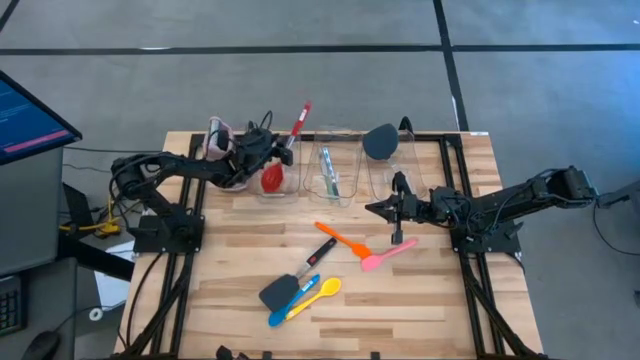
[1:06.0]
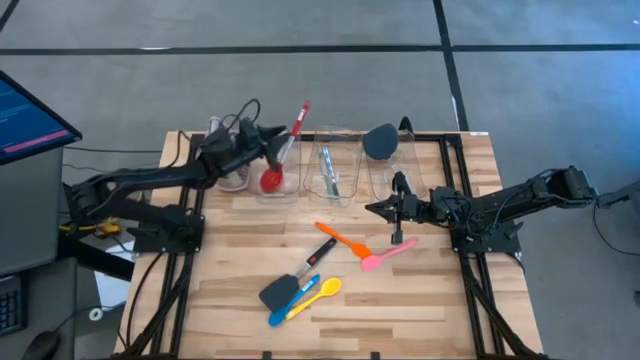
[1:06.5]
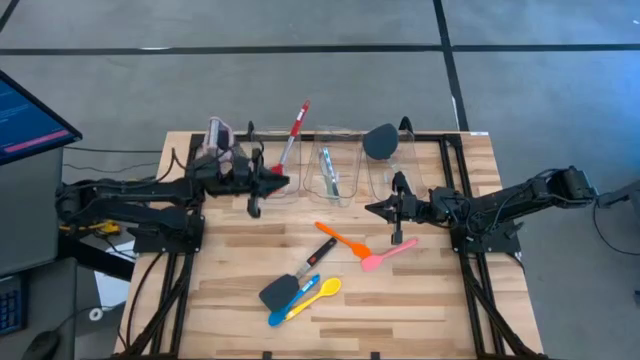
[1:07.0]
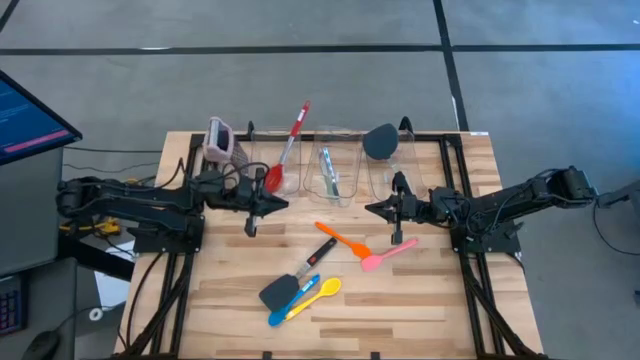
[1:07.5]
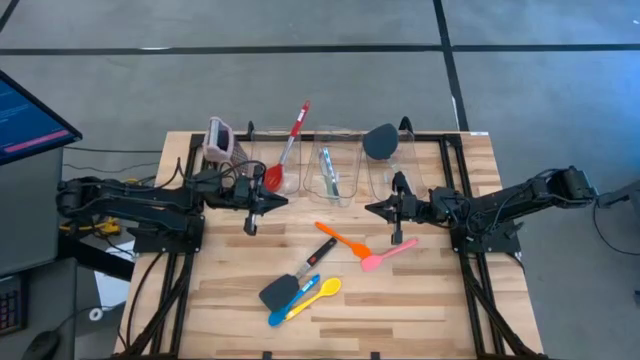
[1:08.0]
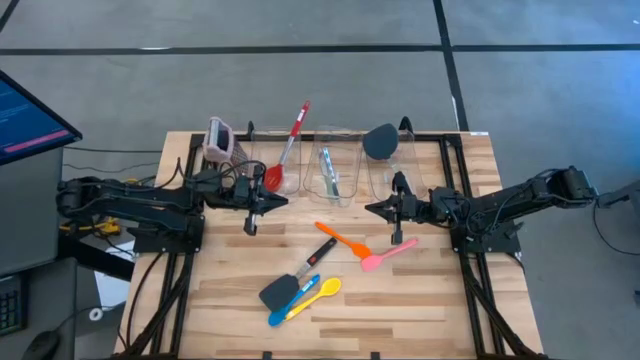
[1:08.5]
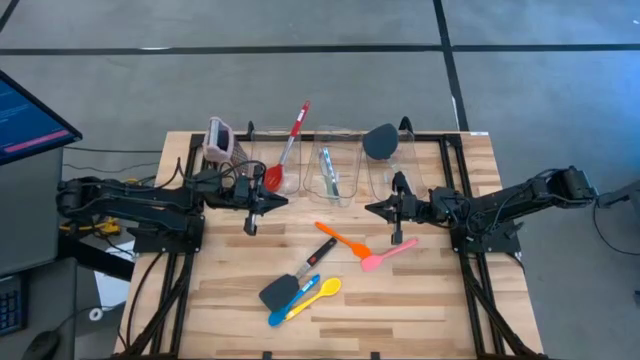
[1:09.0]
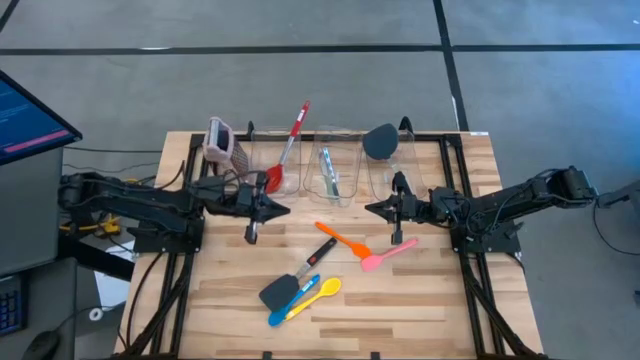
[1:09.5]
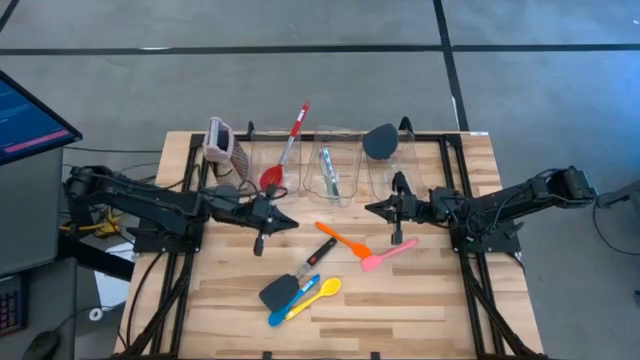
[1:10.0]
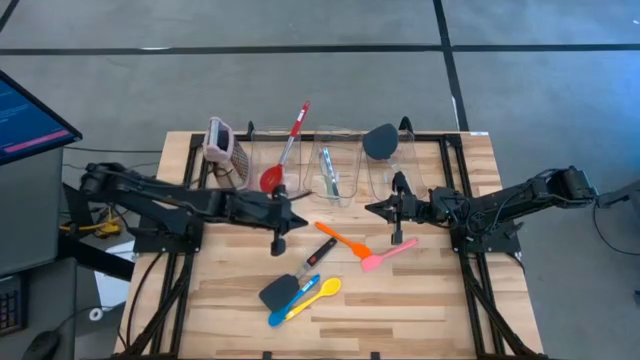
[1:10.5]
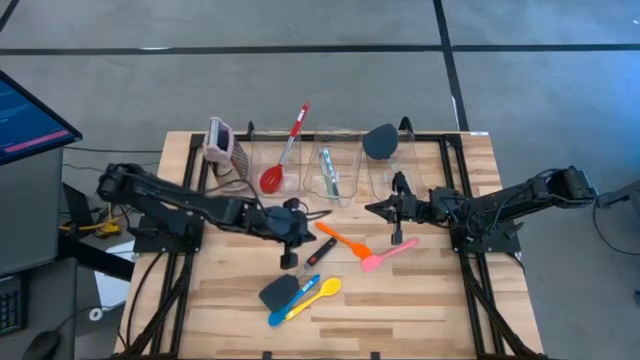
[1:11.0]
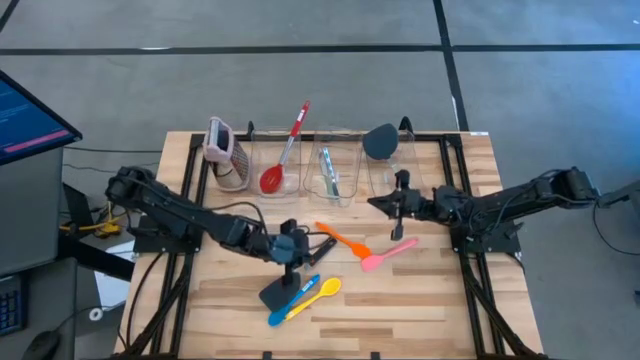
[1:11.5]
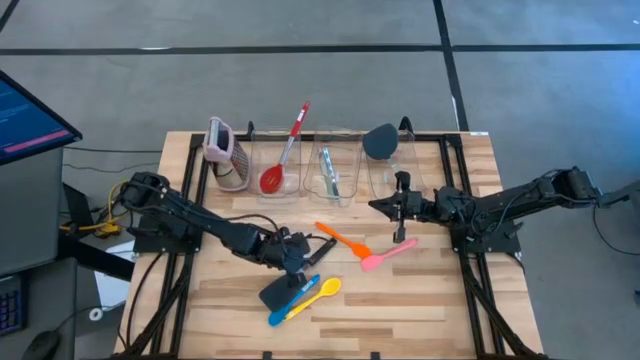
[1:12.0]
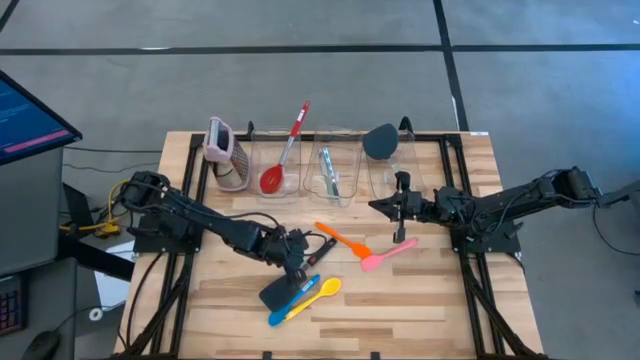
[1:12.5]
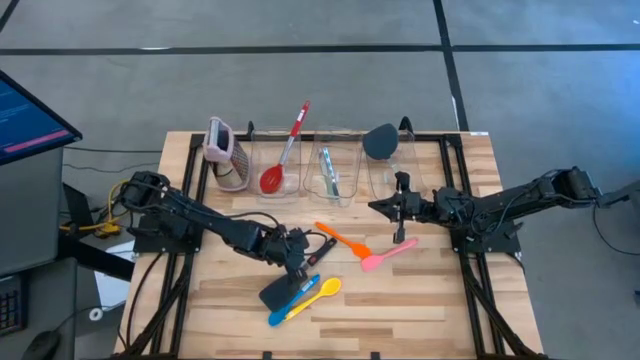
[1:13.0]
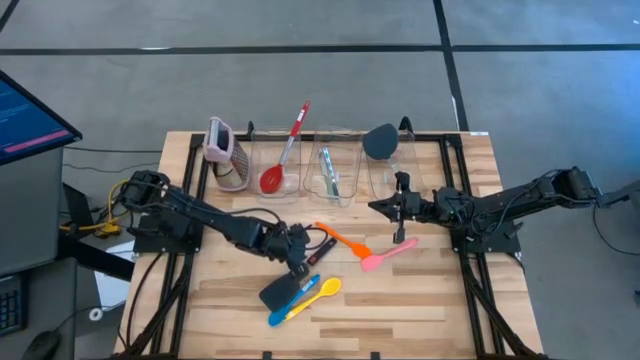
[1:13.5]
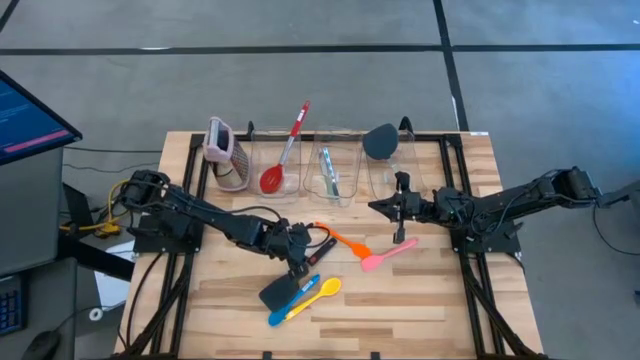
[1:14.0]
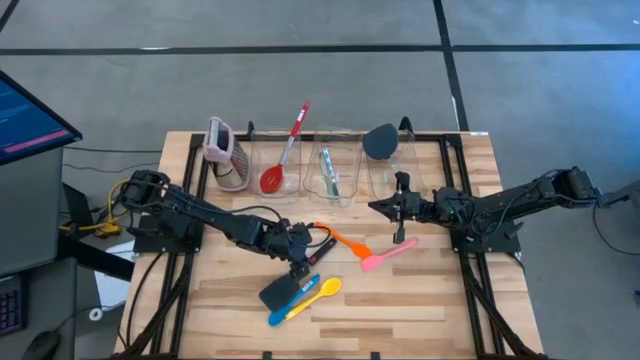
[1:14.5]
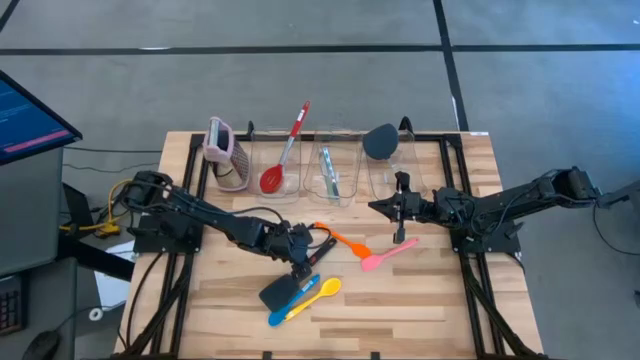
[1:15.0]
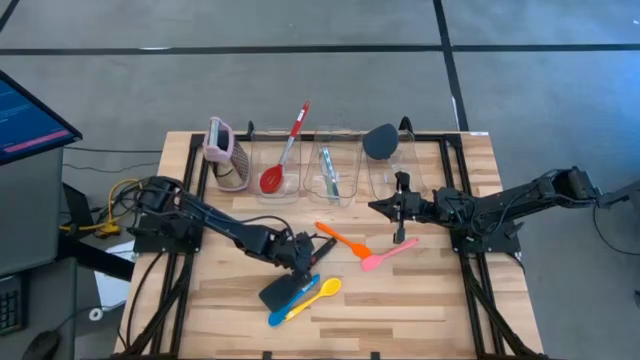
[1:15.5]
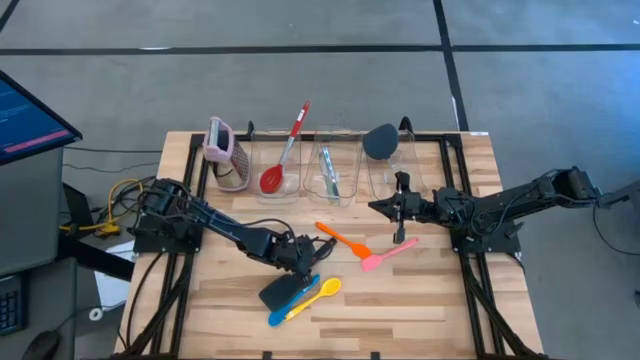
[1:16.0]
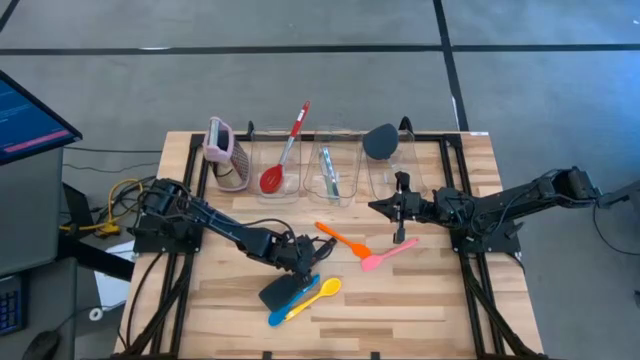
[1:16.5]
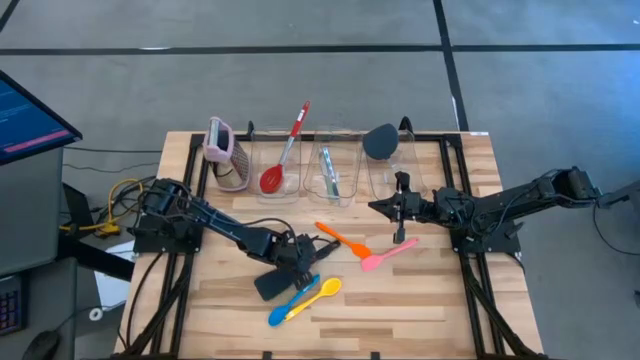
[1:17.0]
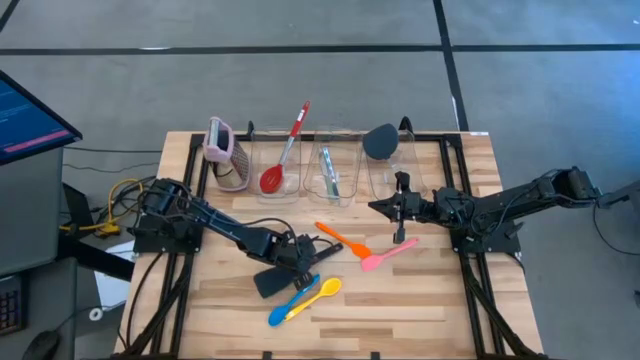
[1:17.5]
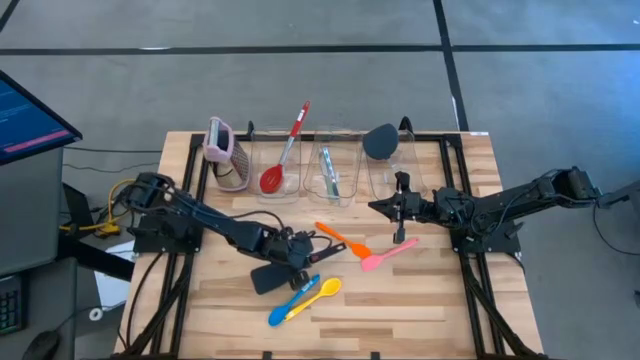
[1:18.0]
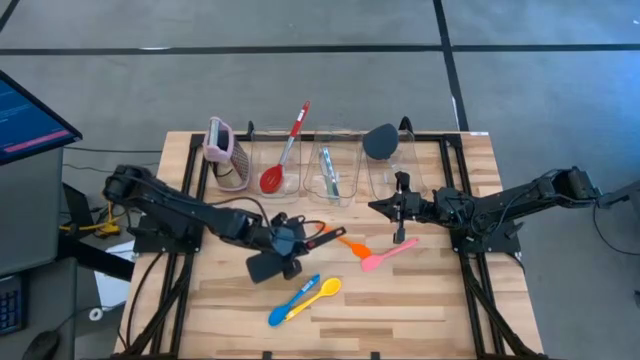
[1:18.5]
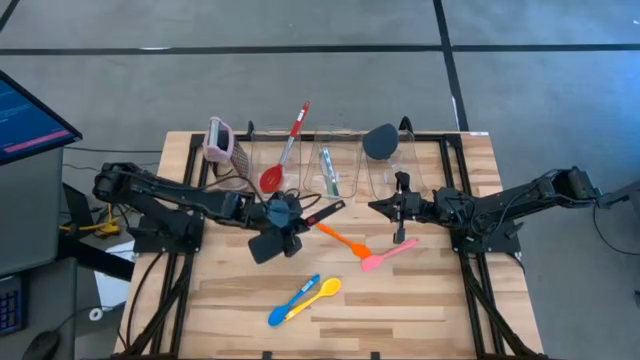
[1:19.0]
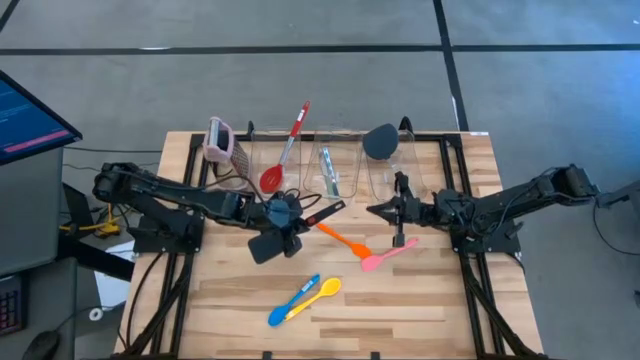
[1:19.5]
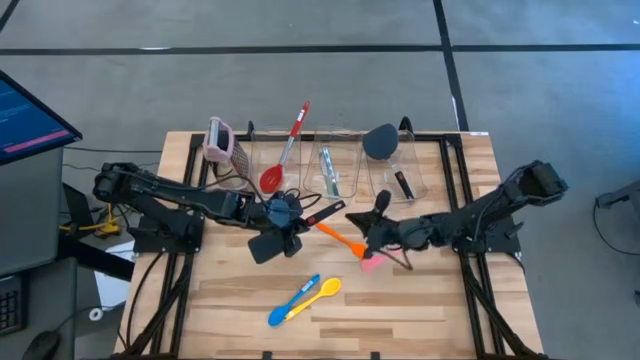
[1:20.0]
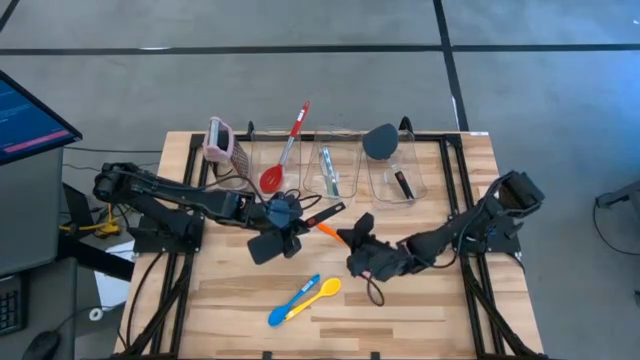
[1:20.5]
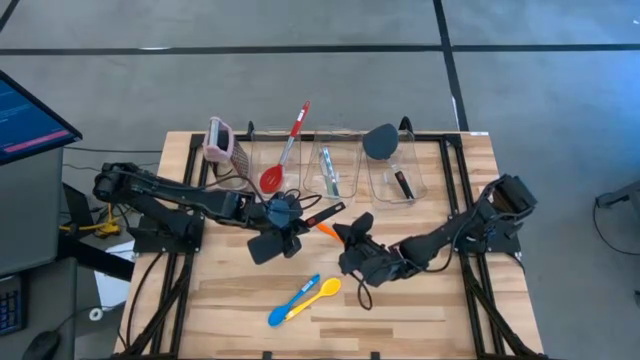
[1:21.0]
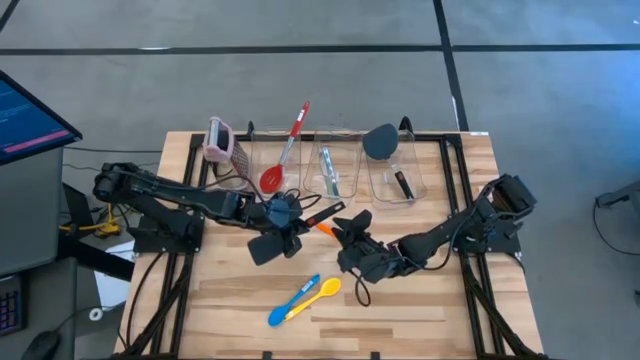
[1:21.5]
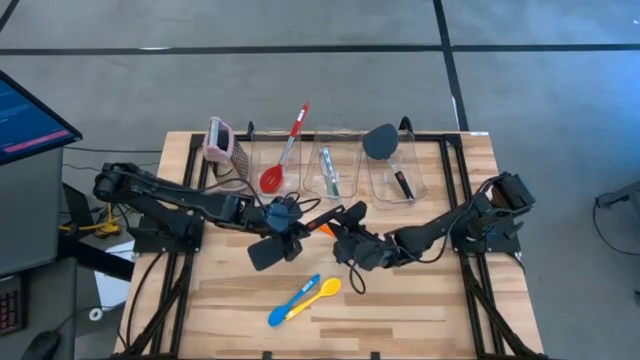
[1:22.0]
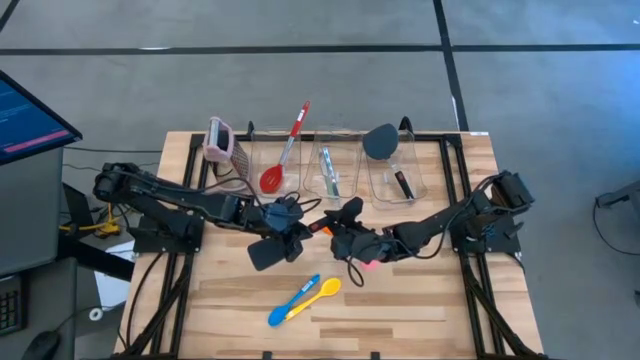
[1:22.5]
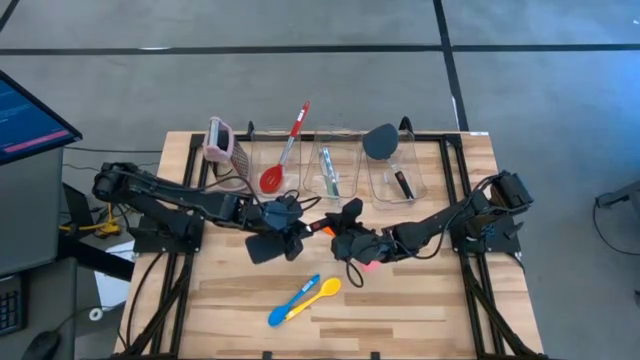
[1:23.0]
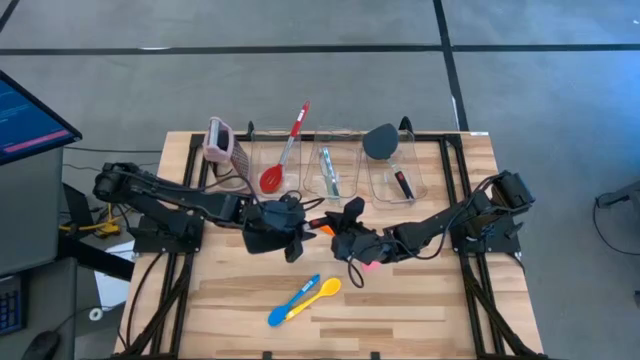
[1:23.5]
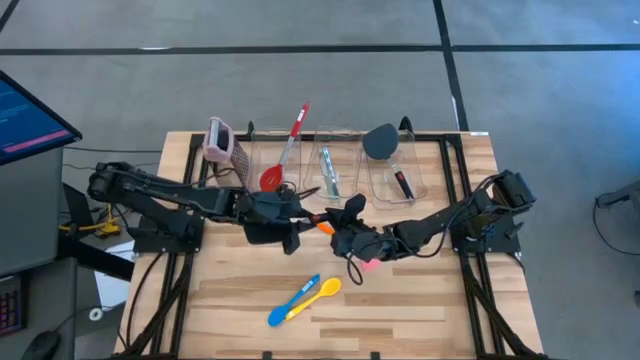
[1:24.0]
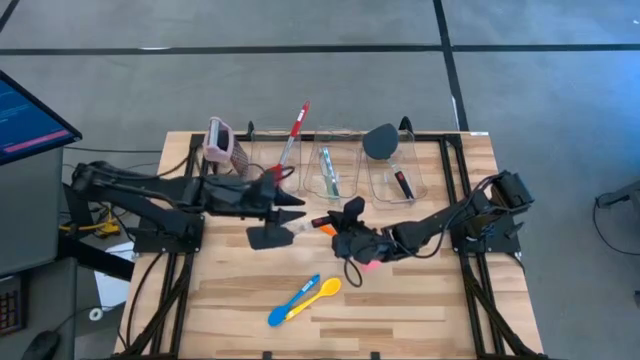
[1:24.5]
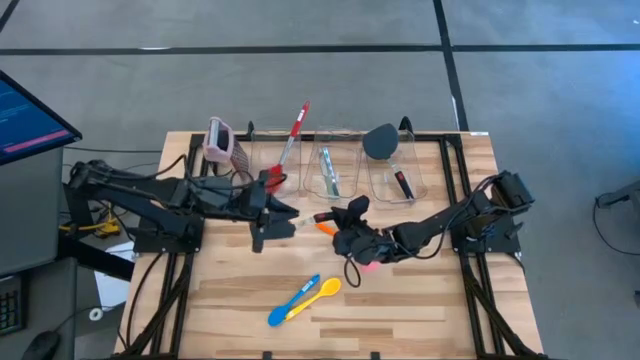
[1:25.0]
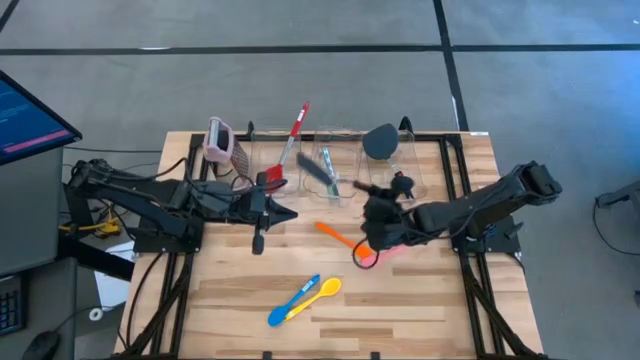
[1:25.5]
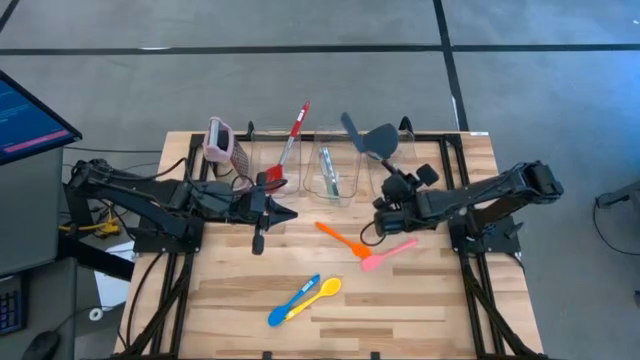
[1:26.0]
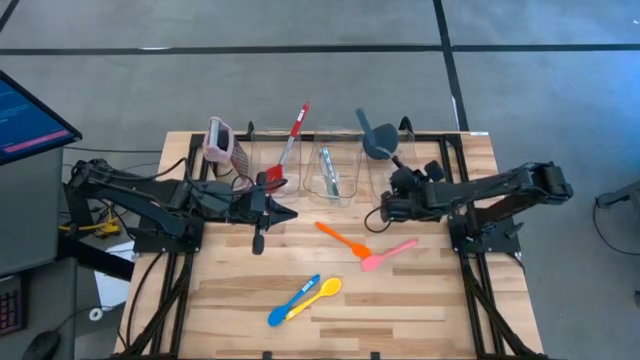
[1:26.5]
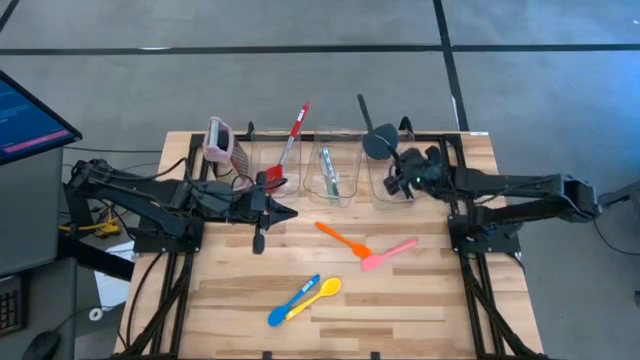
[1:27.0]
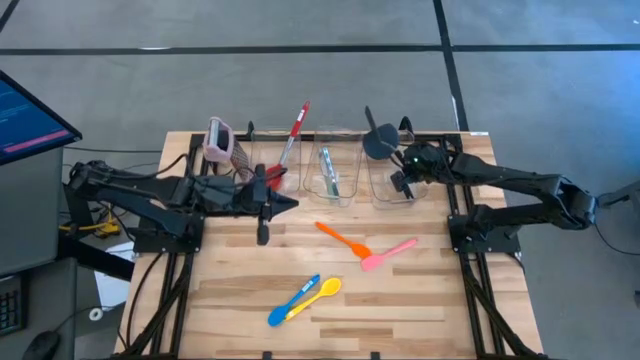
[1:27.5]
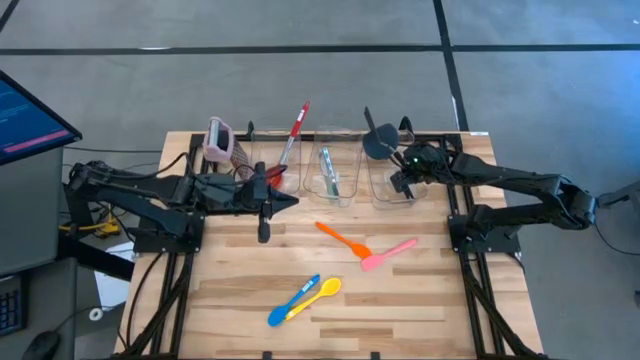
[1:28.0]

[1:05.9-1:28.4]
Task: Pick & Place Kitchen Items
Put the black spatula into the right transparent bin
